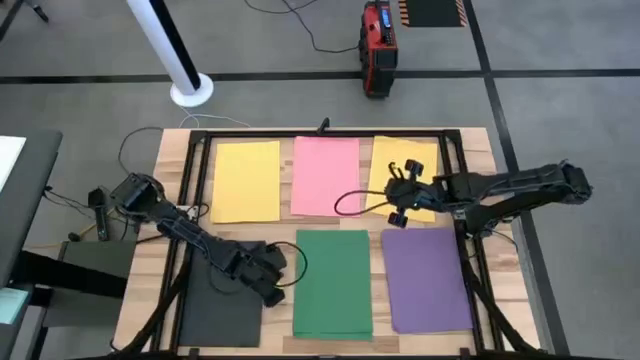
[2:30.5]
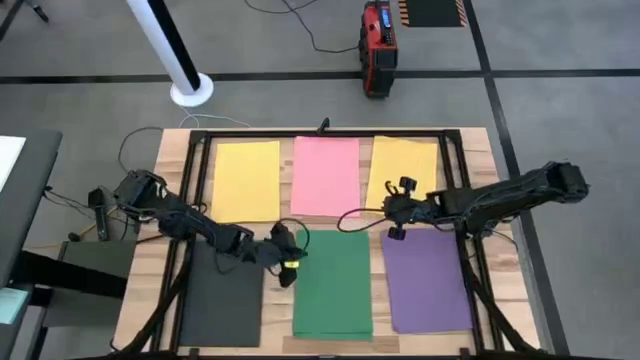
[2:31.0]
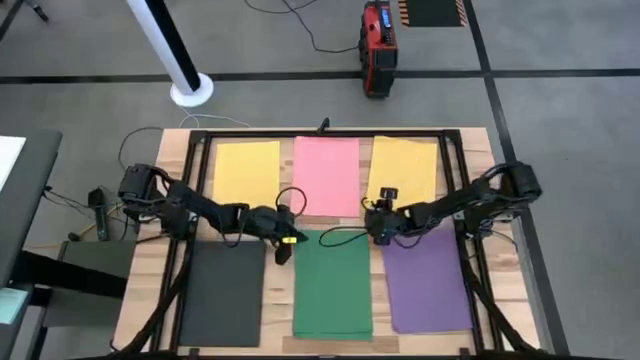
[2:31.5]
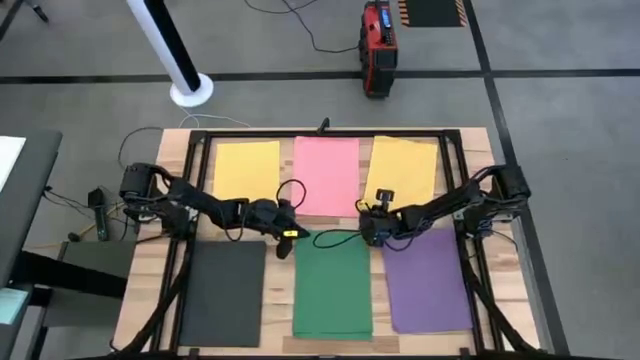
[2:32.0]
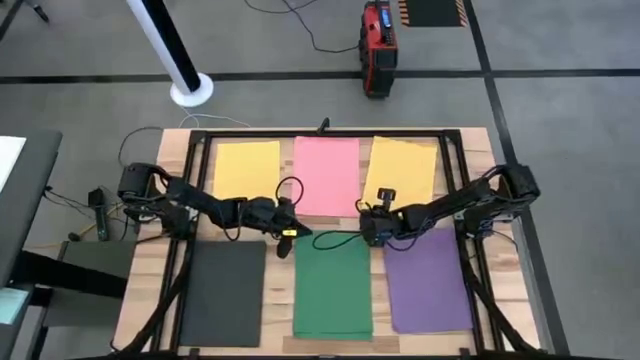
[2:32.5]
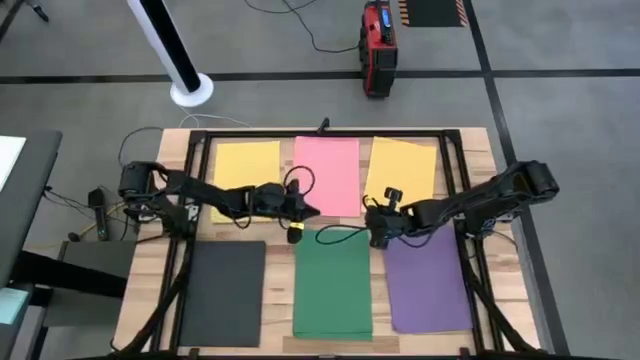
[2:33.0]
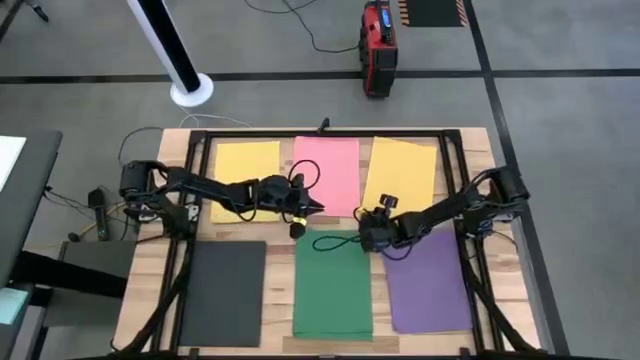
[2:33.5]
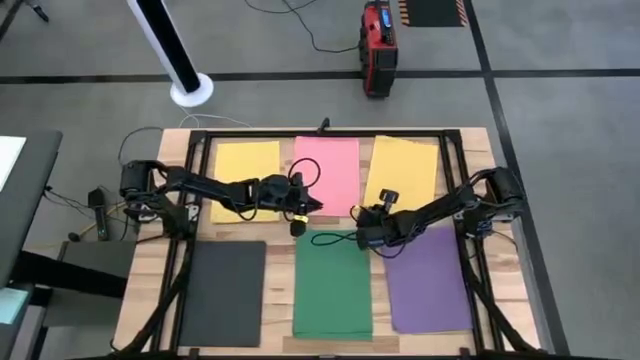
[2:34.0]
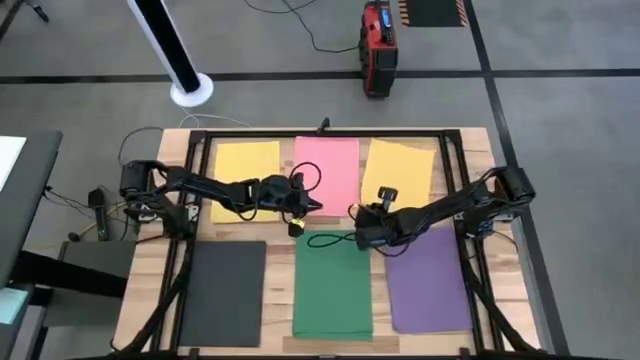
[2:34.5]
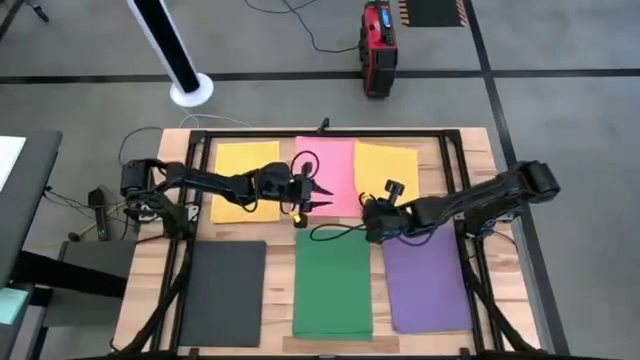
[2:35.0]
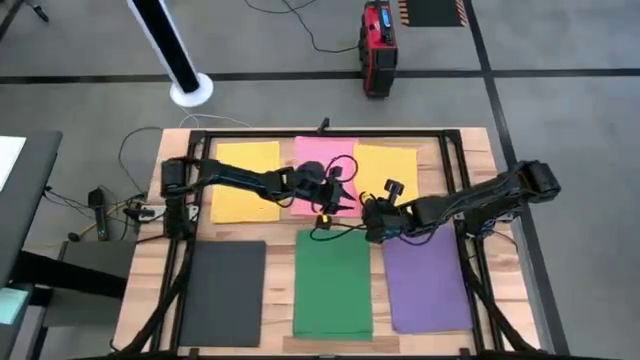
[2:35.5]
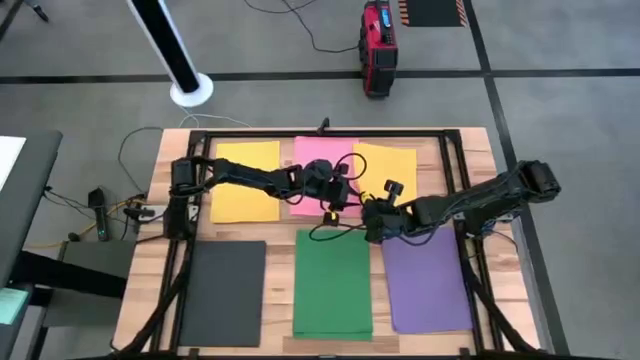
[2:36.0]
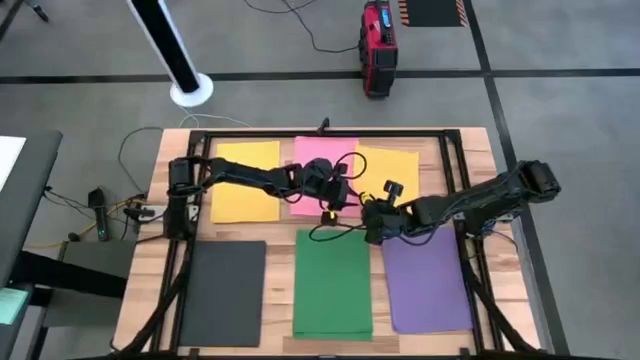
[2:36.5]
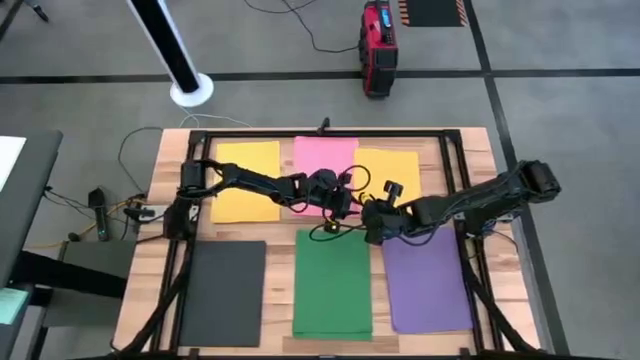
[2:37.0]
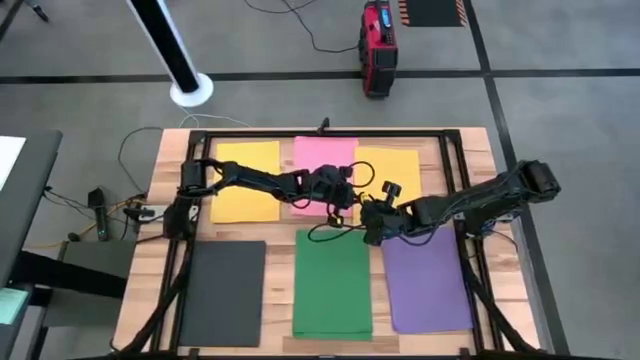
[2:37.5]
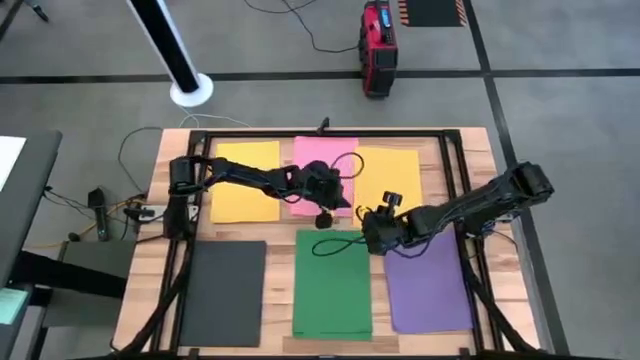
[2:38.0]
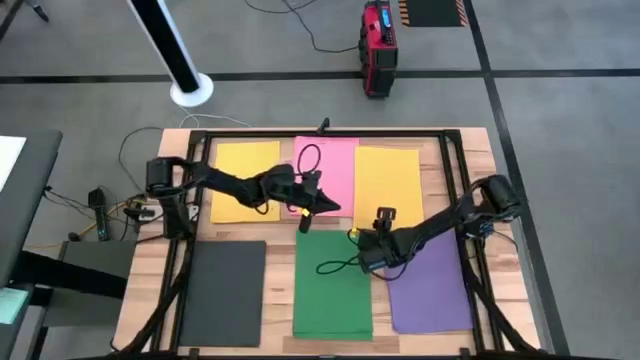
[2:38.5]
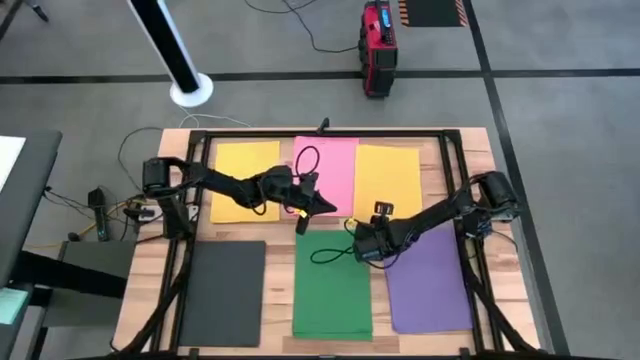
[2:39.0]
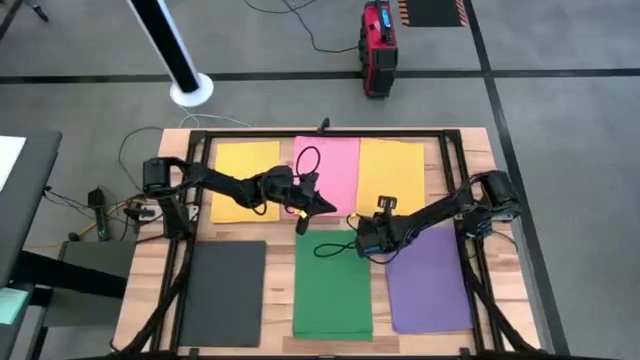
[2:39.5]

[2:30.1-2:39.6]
Task: Organize paper
Stack the right yellow colored paper on top of the left yellow colored paper

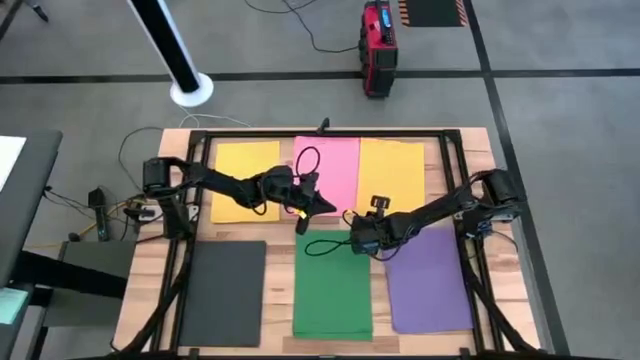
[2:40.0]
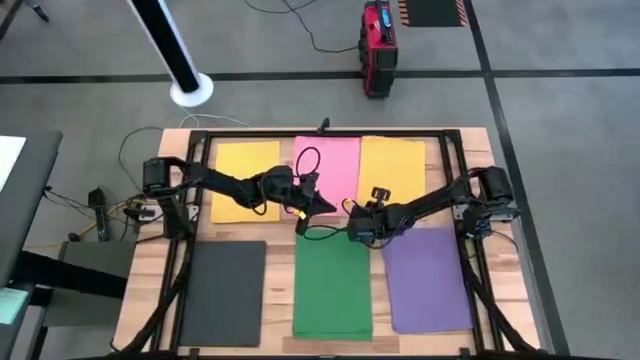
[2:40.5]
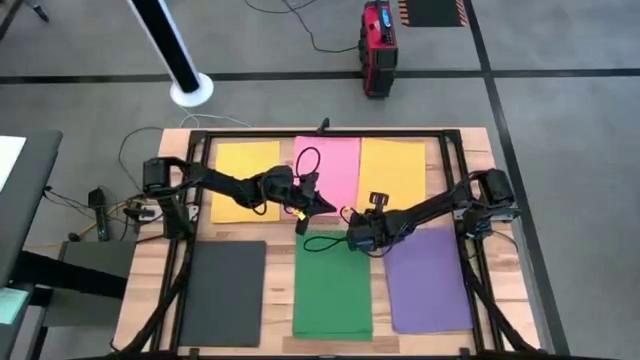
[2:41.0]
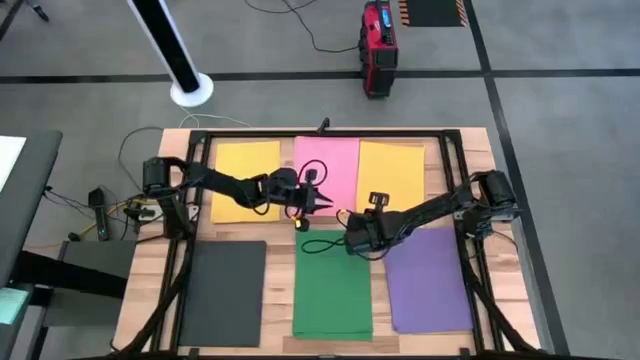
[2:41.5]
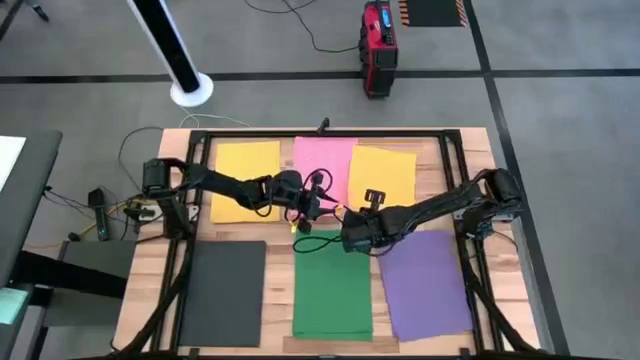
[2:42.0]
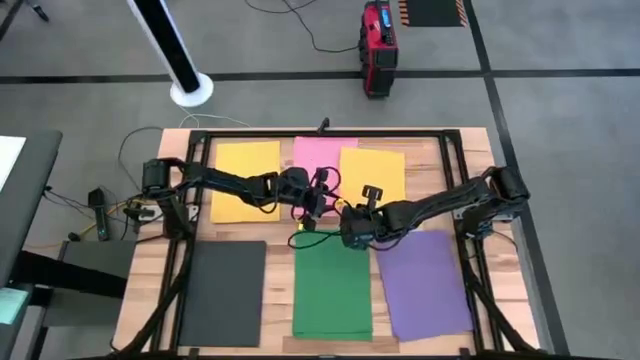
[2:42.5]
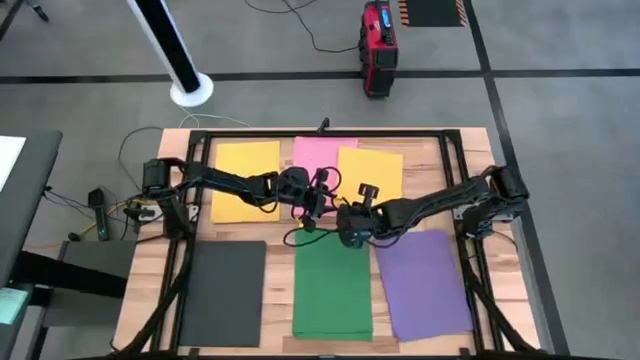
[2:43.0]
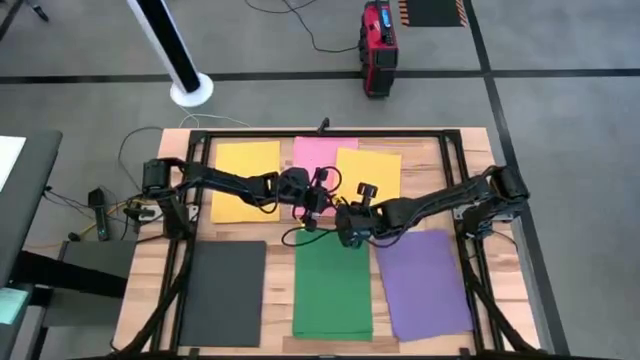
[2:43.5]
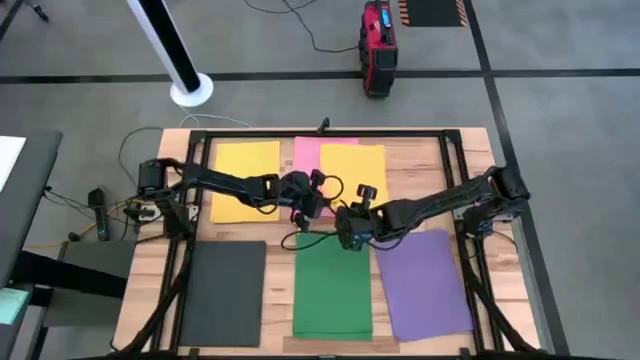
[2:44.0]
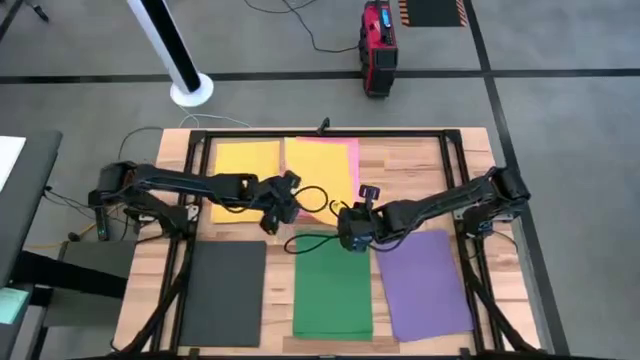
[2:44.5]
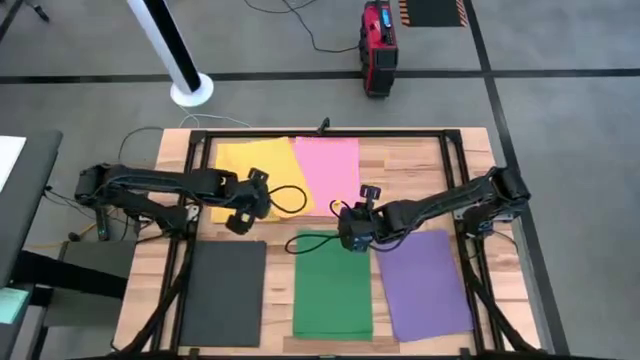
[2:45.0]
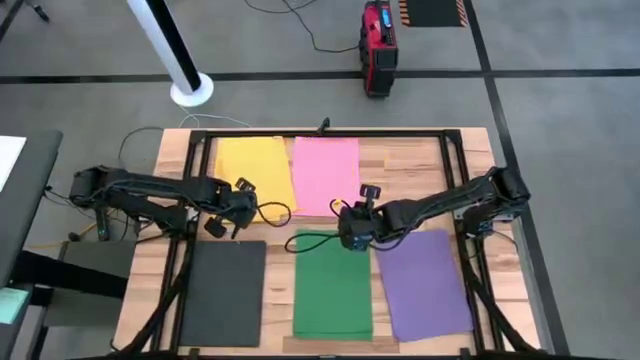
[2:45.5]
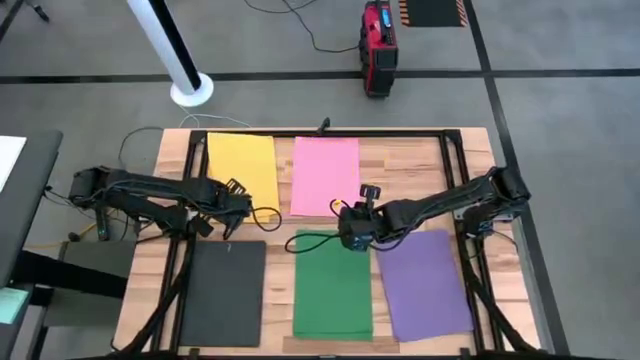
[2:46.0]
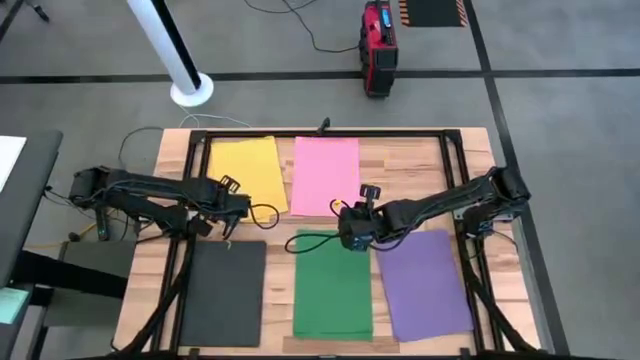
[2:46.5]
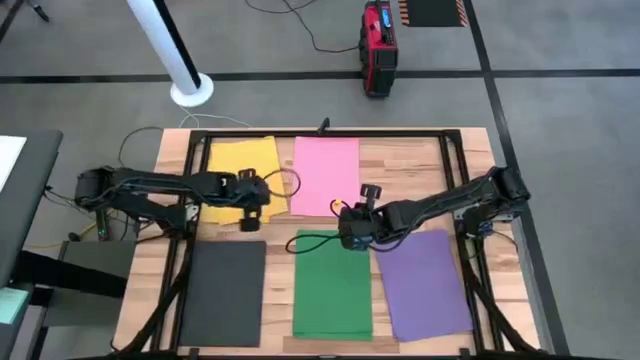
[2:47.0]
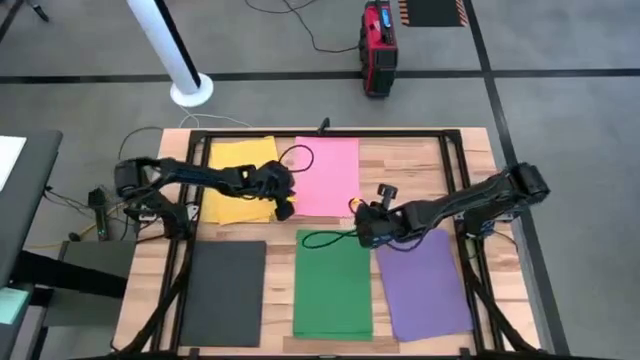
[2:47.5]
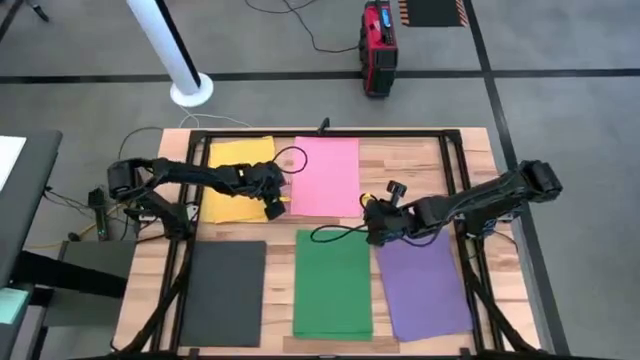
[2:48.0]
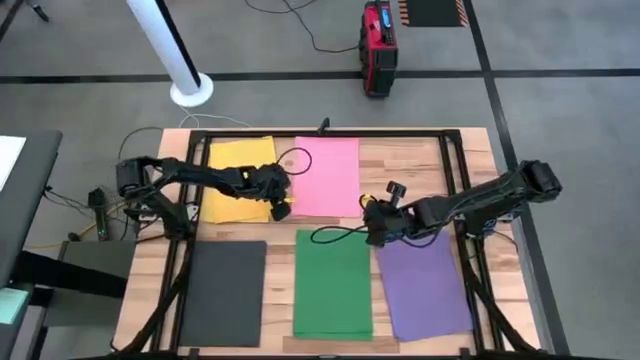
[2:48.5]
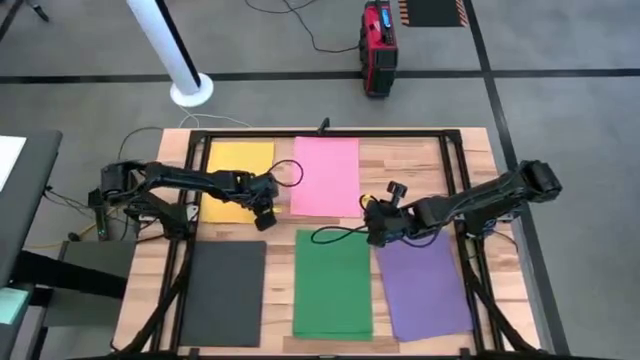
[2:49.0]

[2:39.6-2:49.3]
Stack the right yellow colored paper on top of the left yellow colored paper

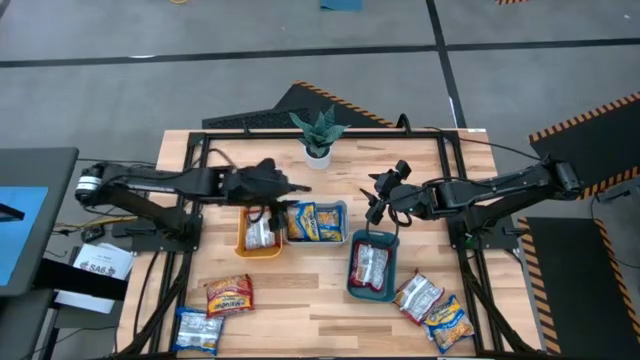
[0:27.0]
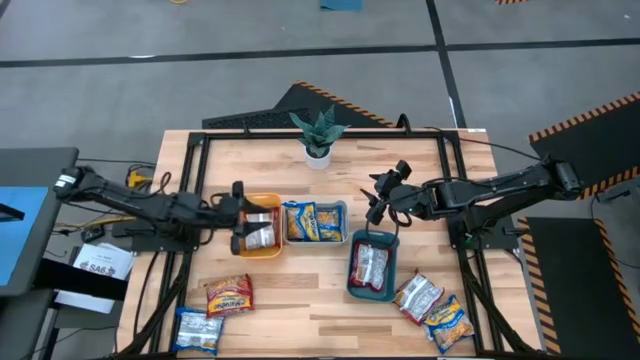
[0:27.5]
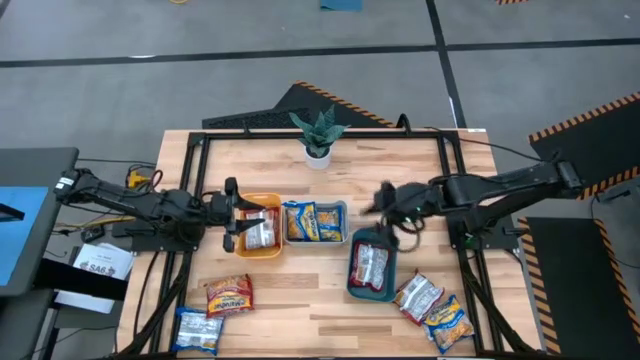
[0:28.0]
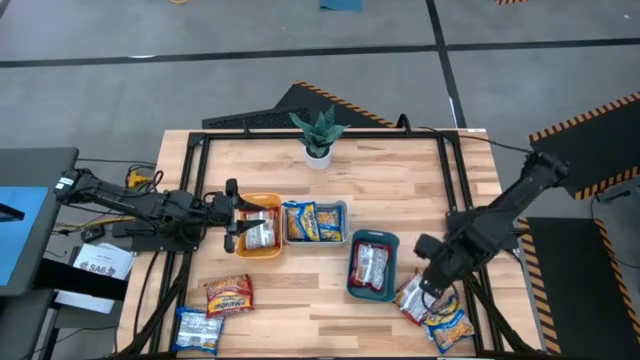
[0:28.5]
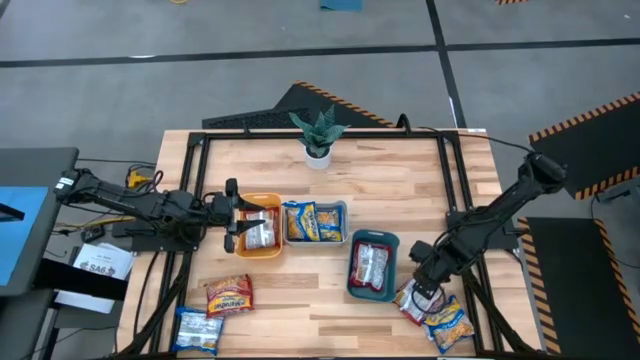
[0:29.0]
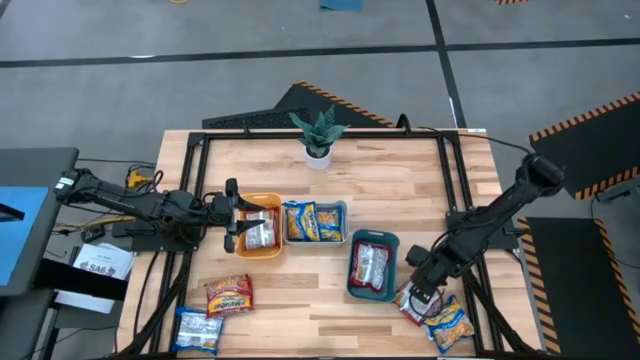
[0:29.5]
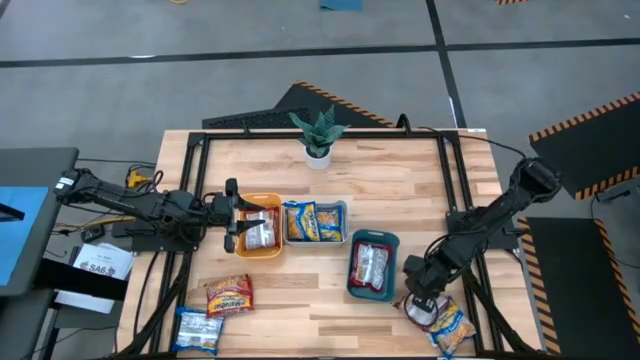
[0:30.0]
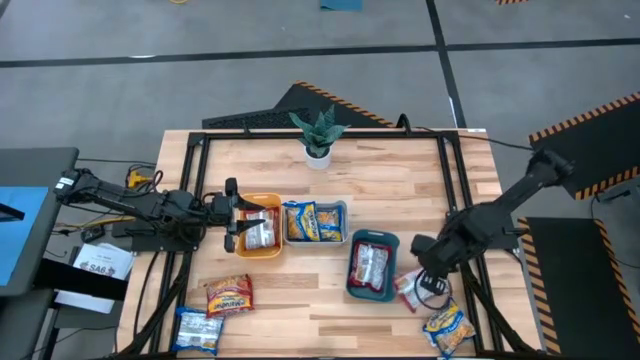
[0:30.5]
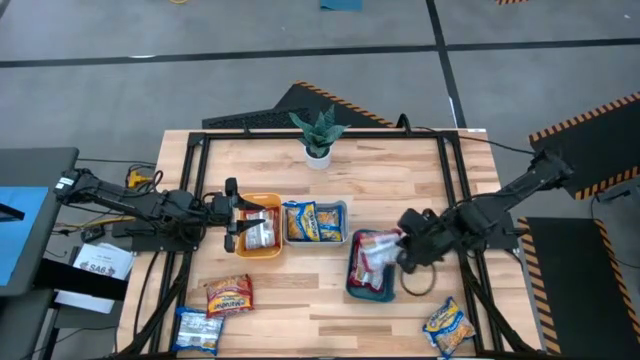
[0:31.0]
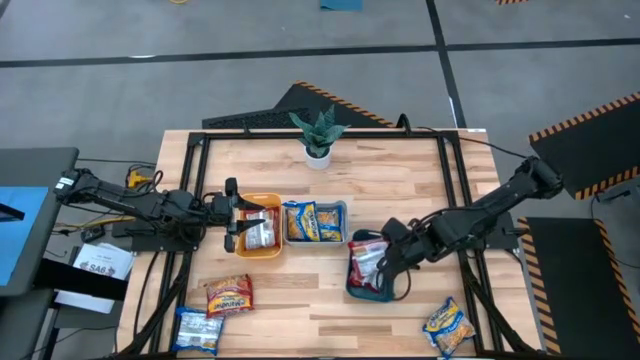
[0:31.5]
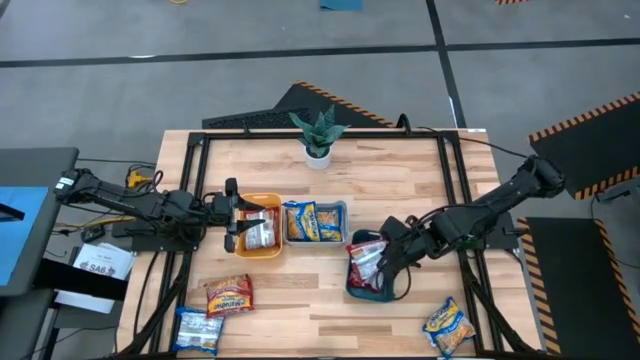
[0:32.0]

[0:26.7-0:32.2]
Task: Sort Maruchan noodles
Put the right red noodle pack into the blue bin
